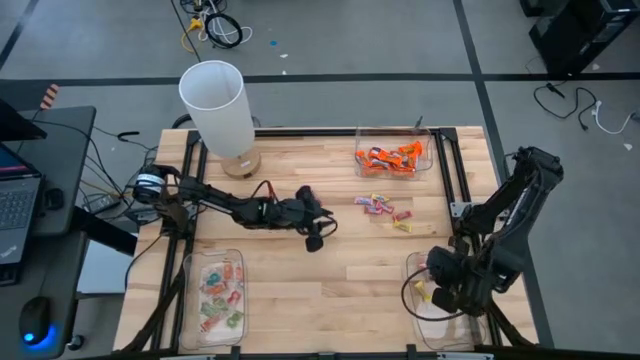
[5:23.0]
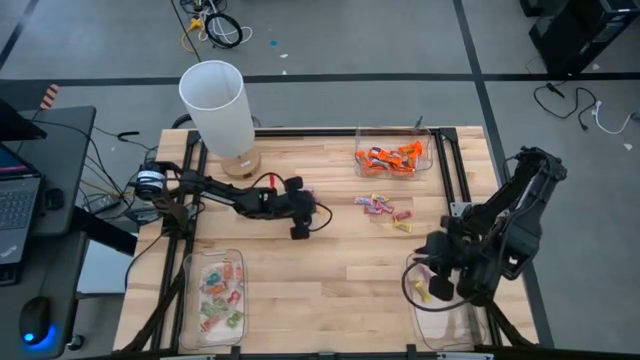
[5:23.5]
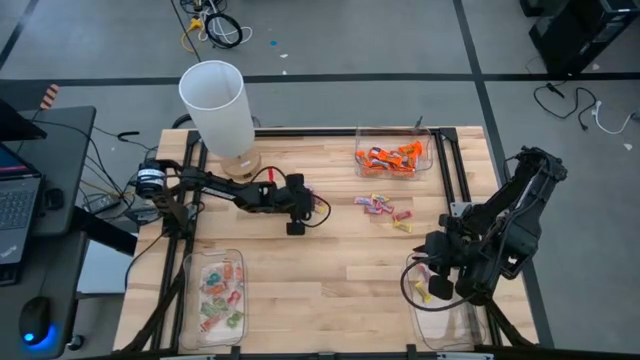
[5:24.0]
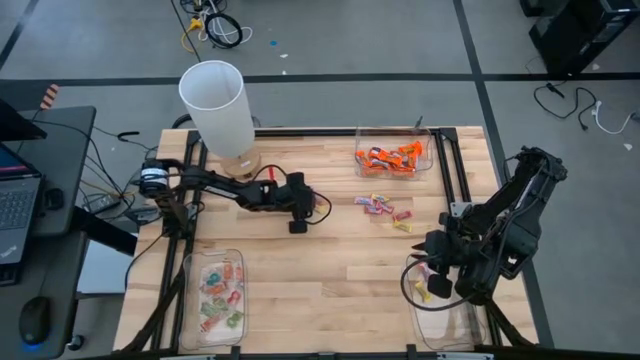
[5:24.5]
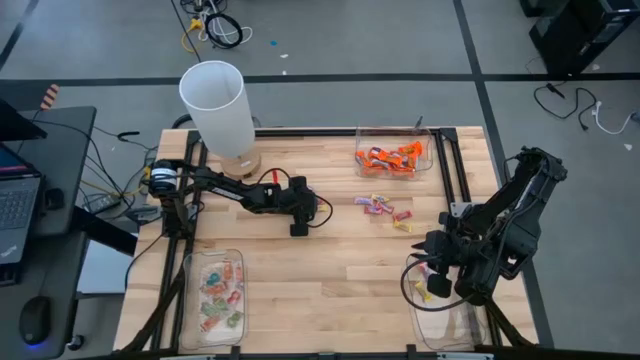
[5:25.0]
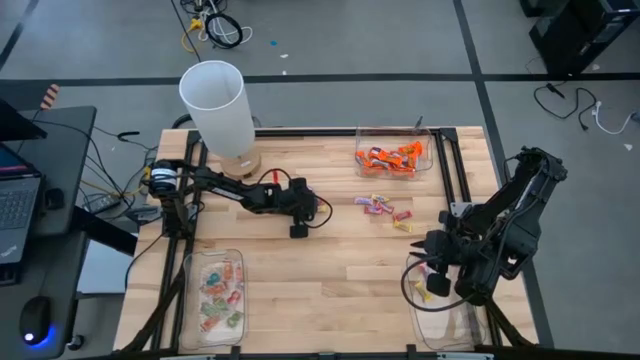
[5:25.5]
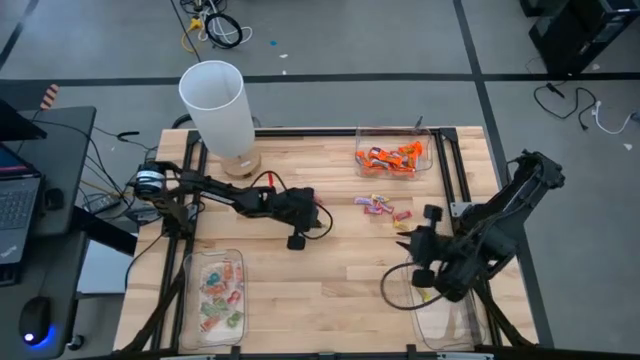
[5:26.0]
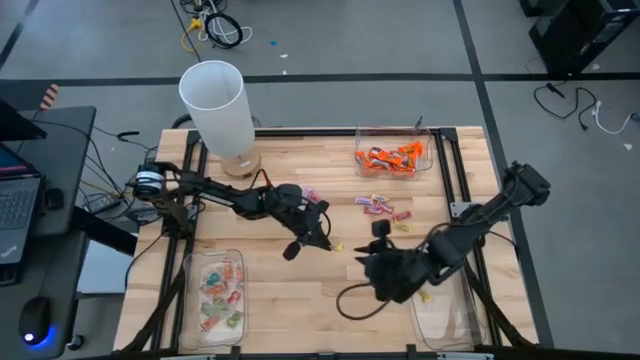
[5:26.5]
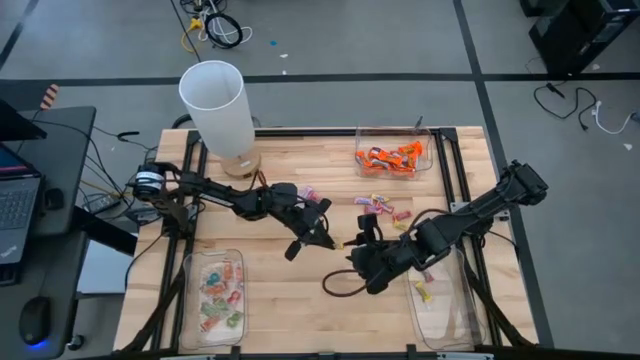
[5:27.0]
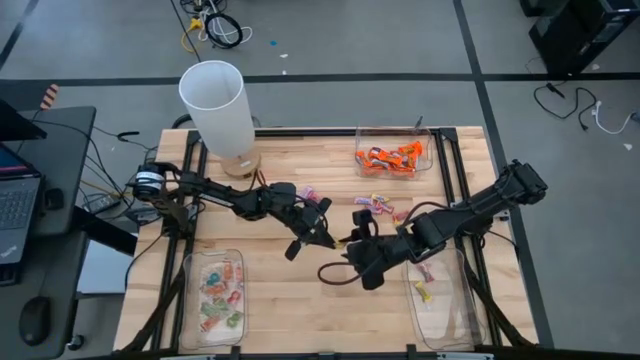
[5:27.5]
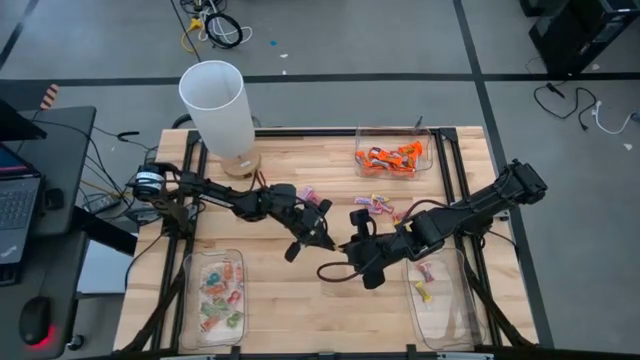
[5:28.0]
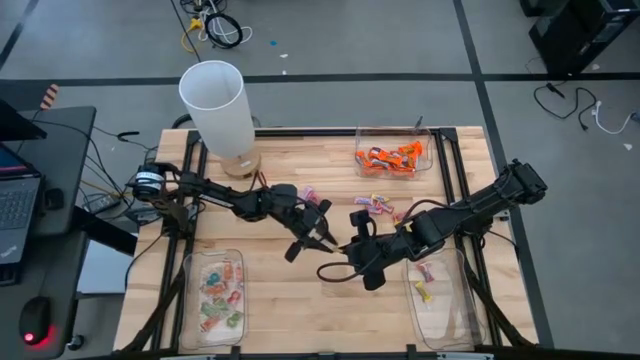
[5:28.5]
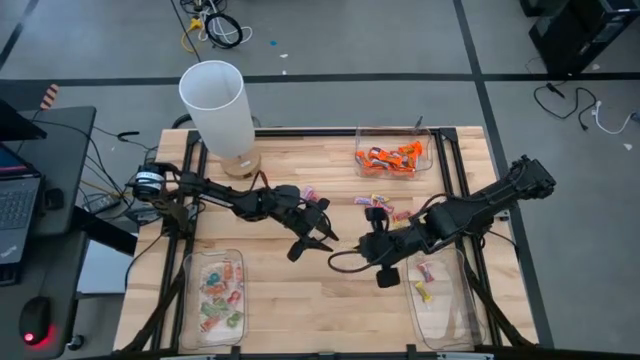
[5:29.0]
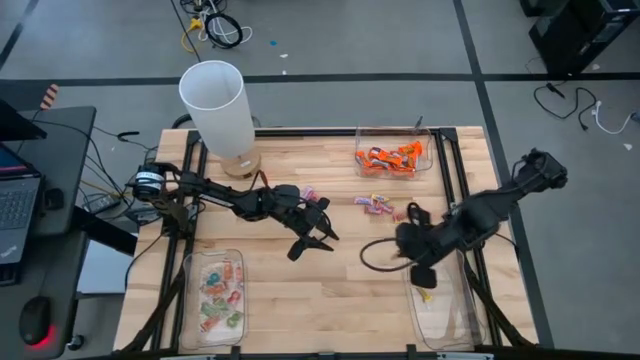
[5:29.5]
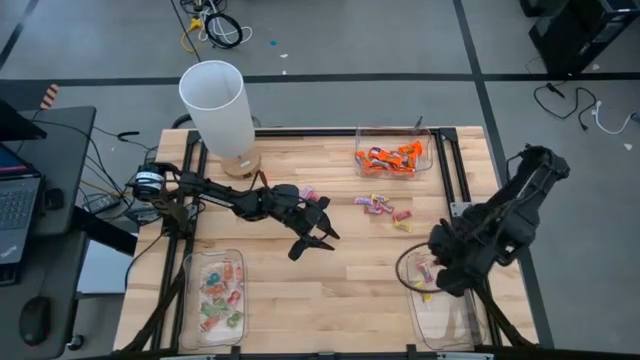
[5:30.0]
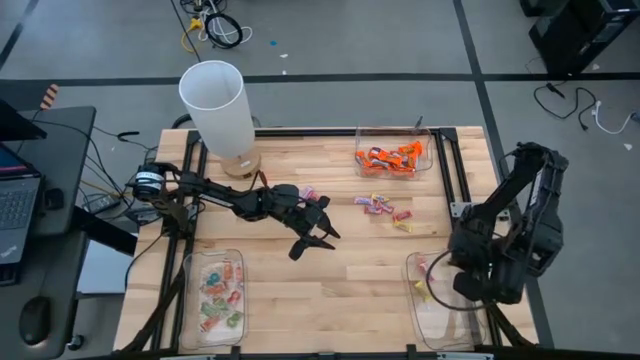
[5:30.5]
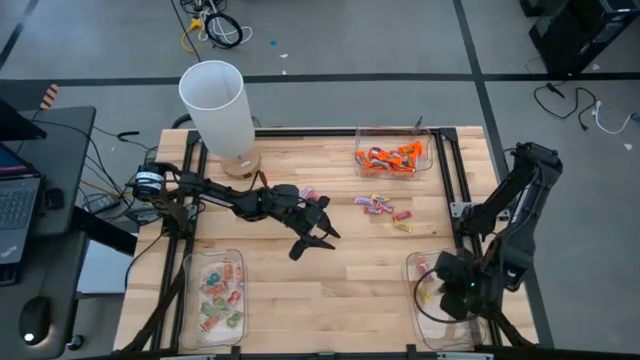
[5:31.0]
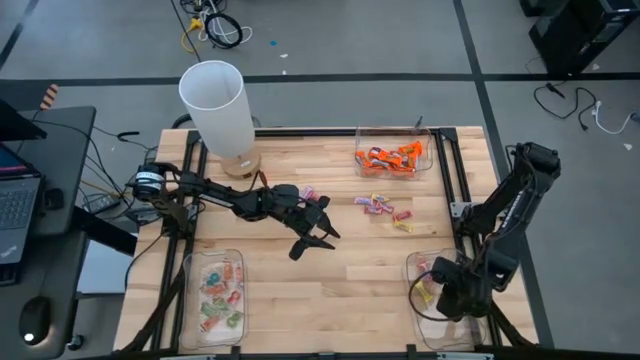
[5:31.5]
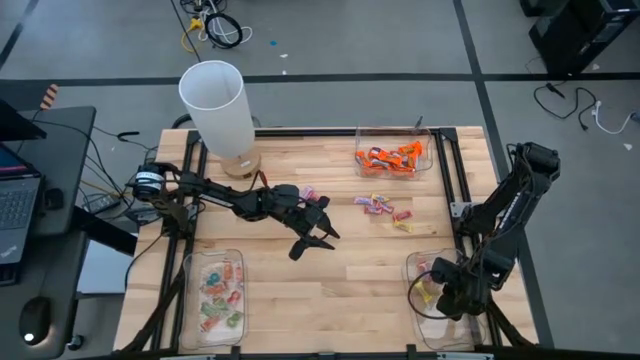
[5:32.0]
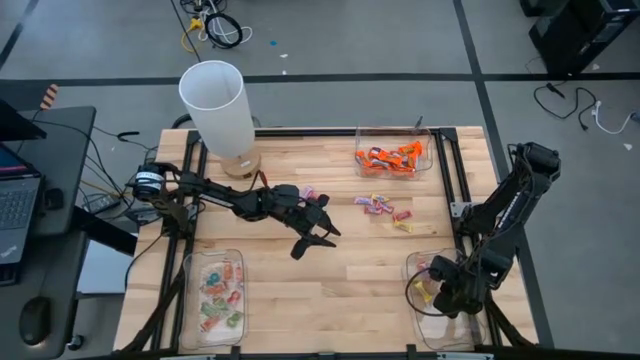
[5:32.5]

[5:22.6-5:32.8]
Task: Sort candy
Put the yellow candy into the bottom right transparent bin

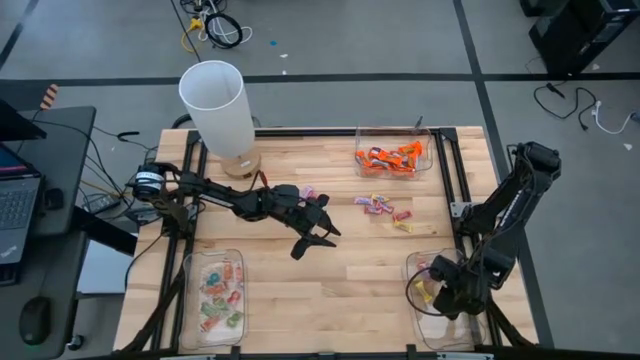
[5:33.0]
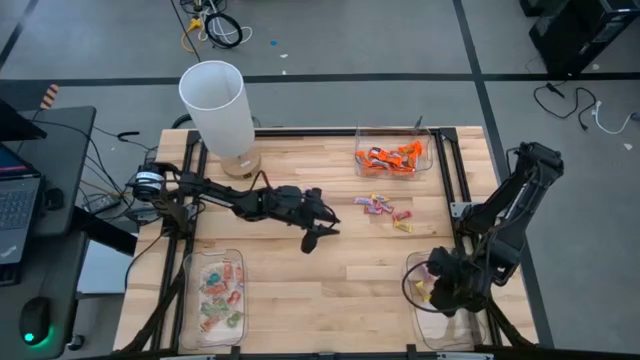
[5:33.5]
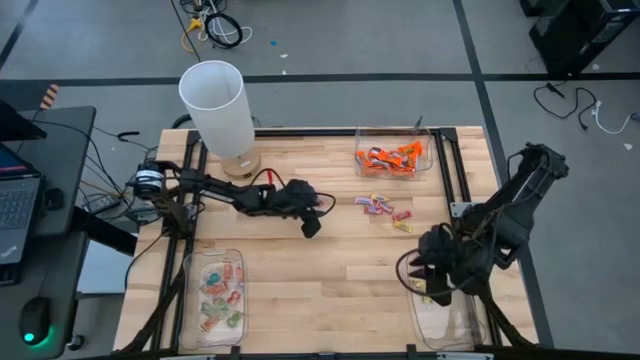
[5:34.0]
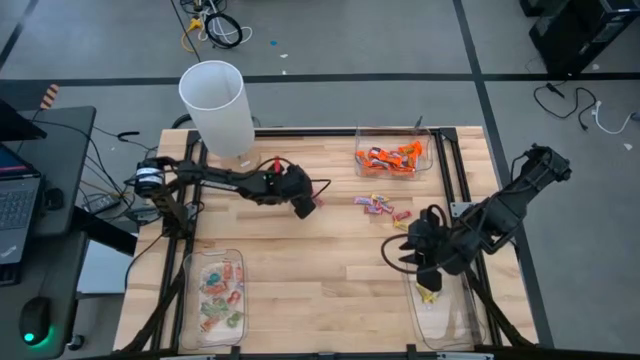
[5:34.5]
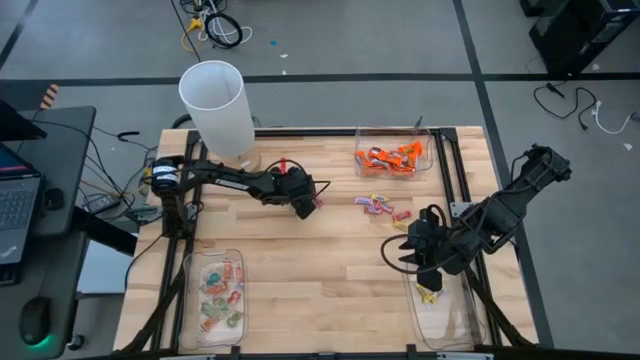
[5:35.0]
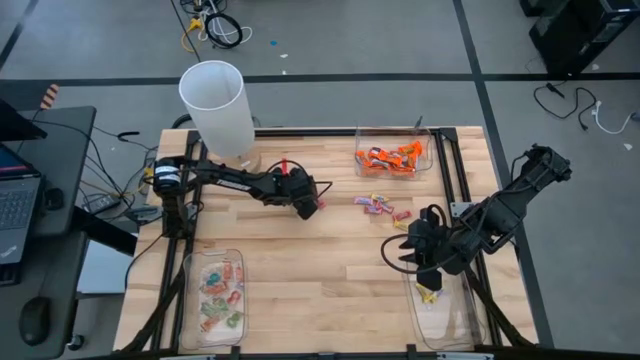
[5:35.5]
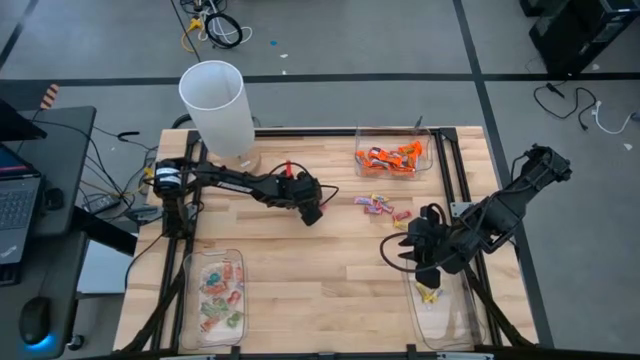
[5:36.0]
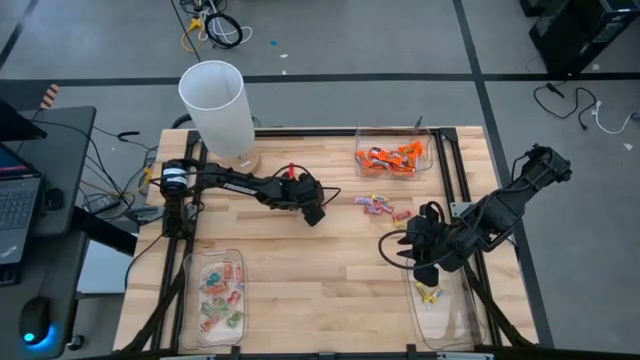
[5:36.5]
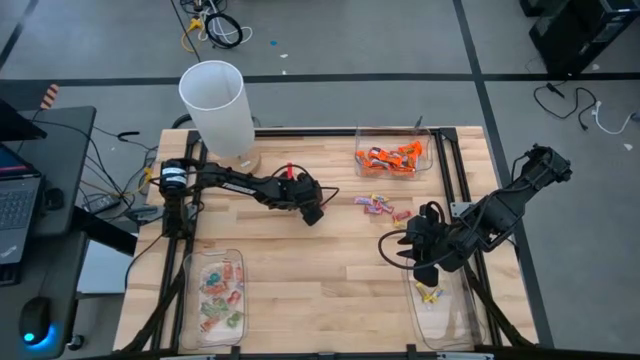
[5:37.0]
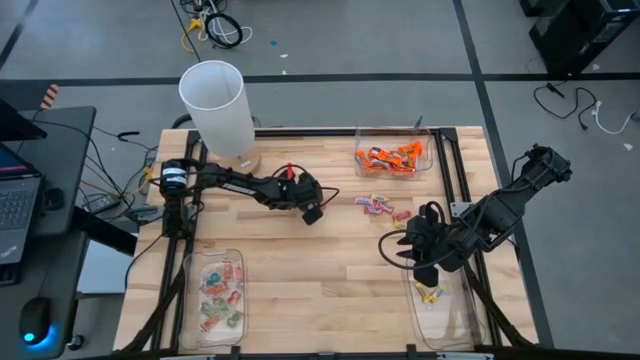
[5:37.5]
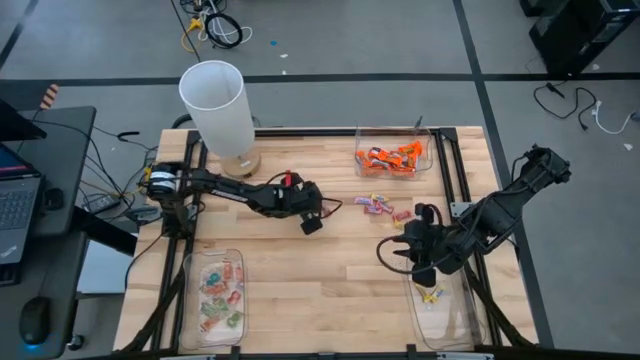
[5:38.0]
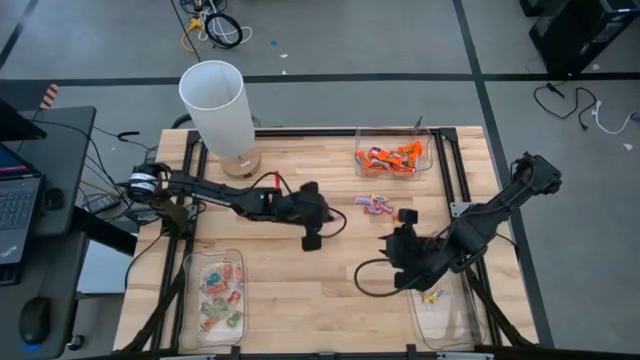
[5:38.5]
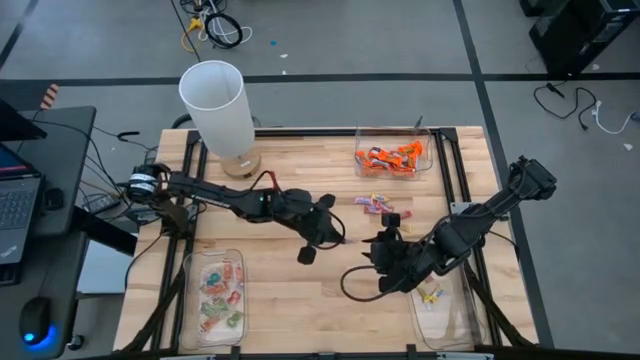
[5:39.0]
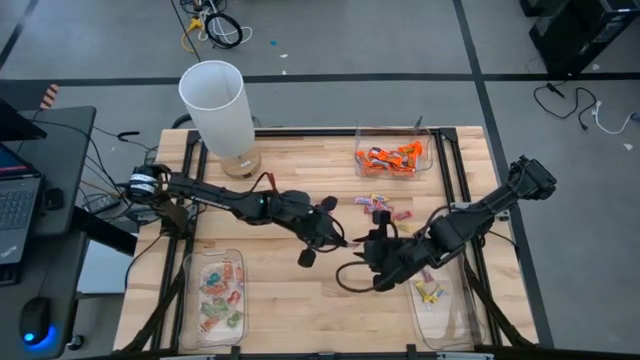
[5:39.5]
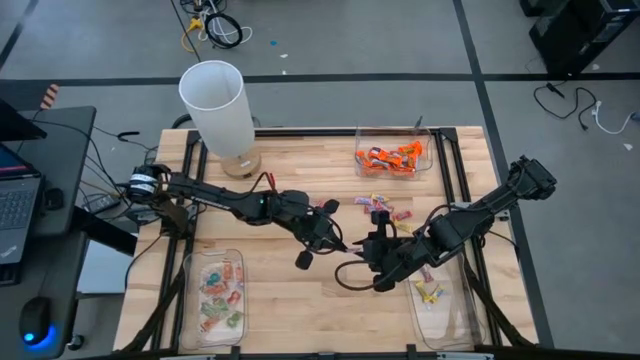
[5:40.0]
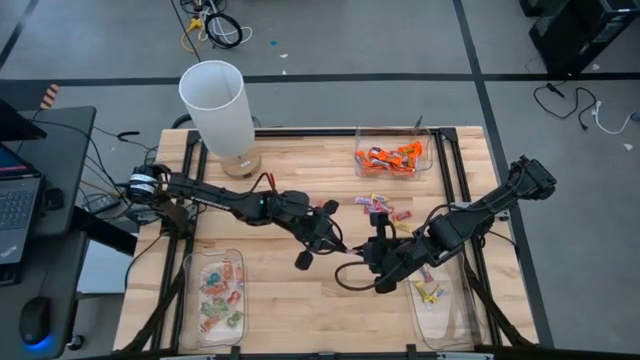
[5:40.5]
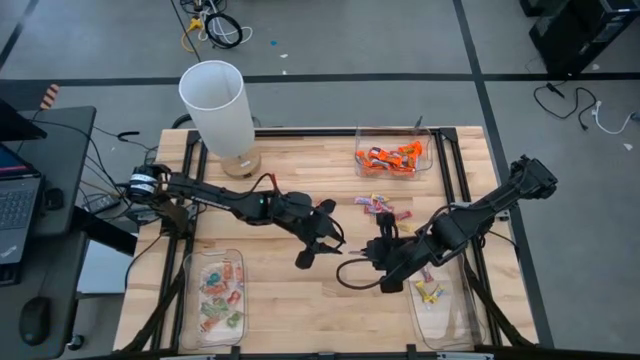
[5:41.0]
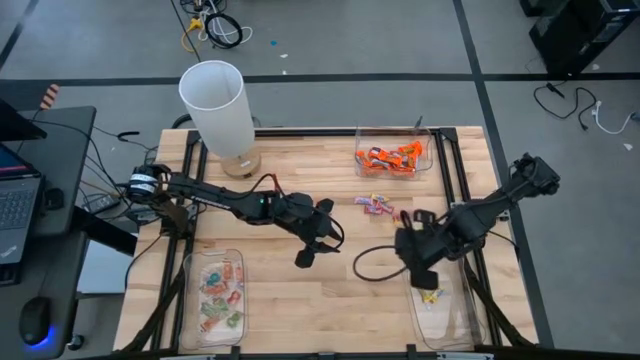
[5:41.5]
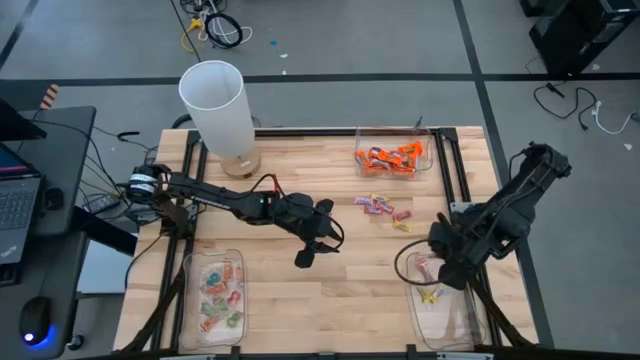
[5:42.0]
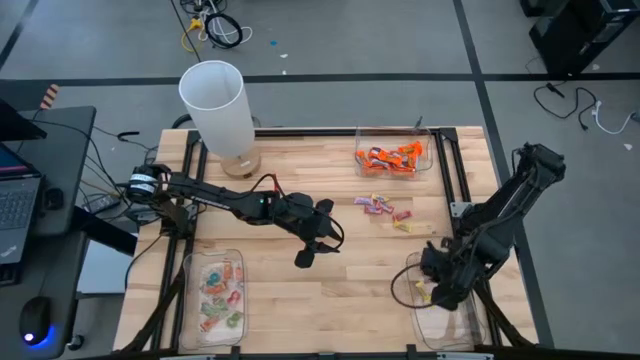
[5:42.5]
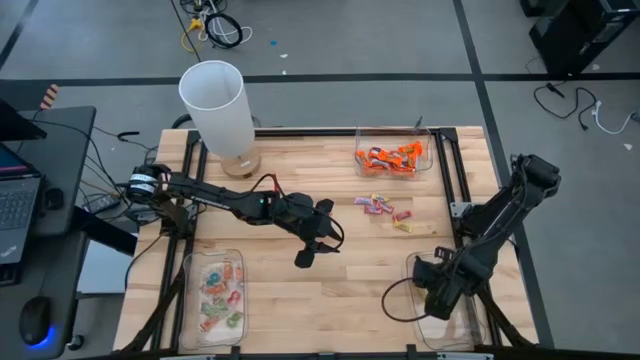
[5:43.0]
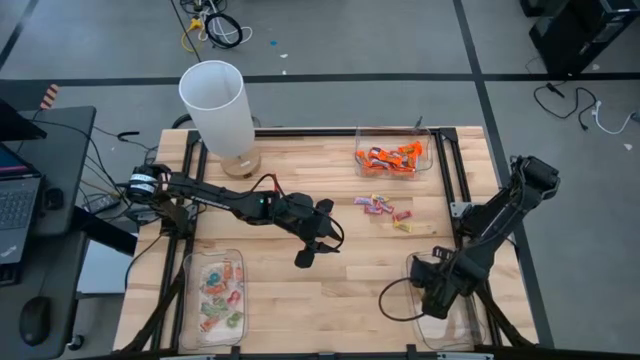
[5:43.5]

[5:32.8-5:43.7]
Put the pink candy into the bottom right transparent bin
